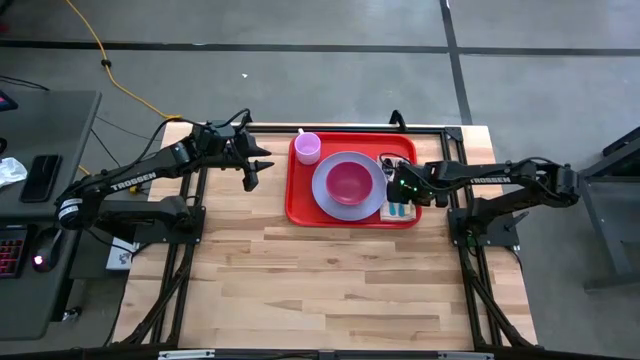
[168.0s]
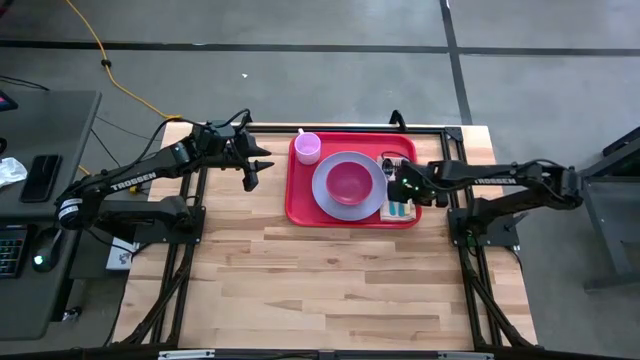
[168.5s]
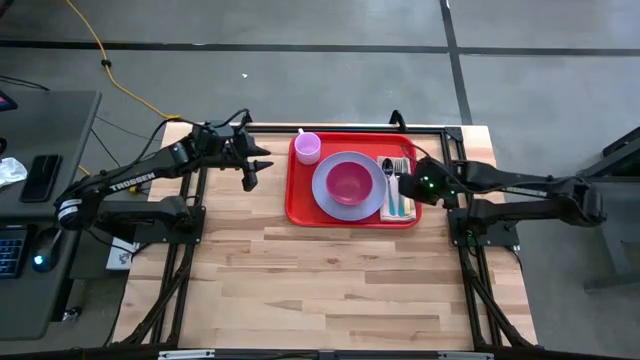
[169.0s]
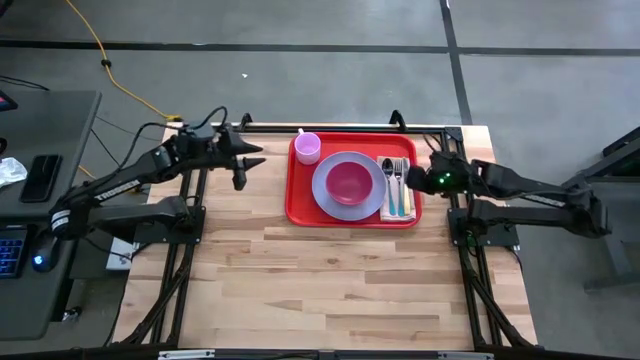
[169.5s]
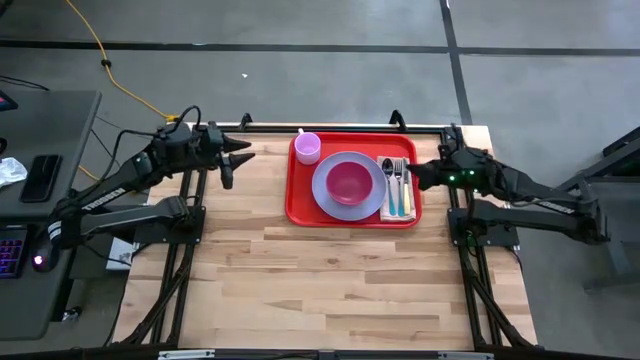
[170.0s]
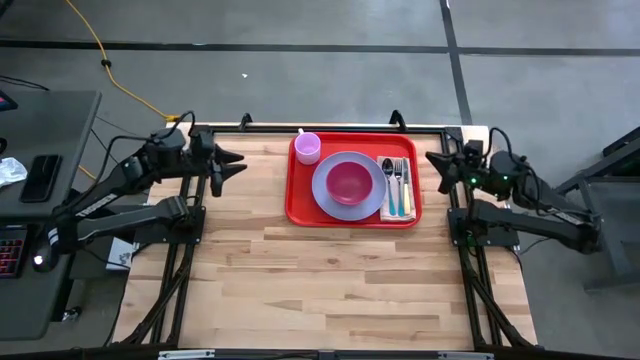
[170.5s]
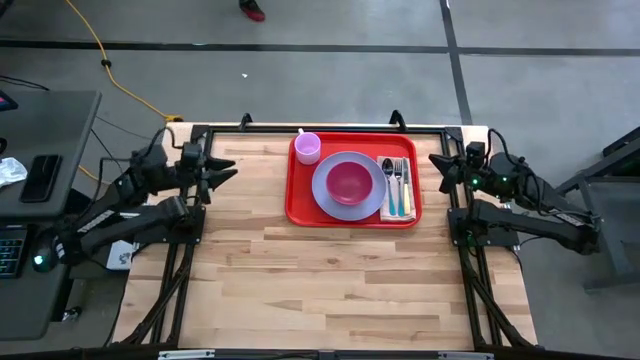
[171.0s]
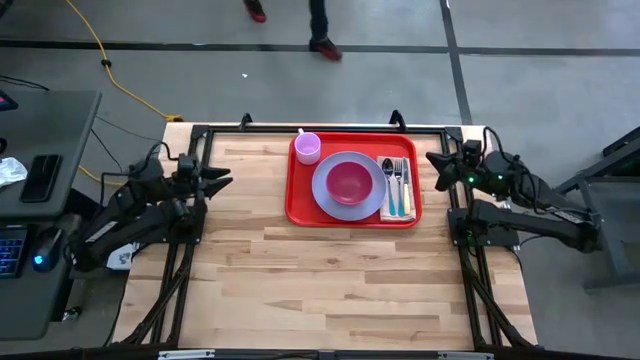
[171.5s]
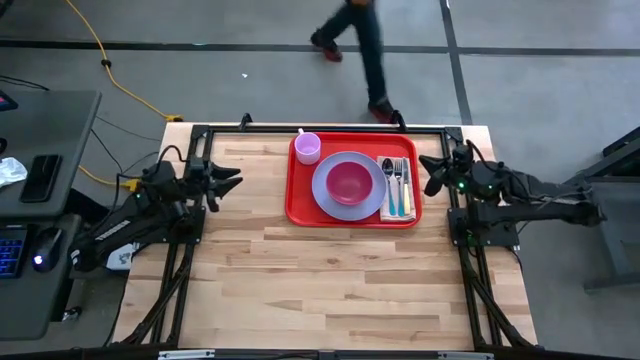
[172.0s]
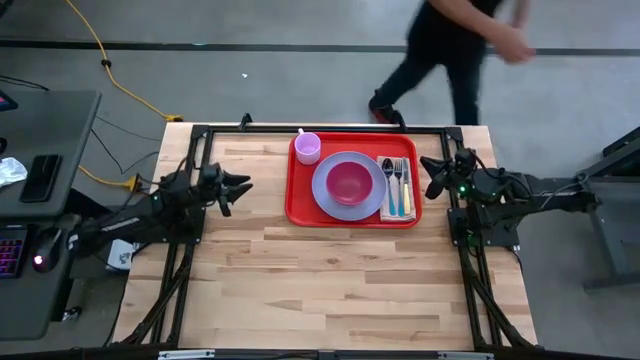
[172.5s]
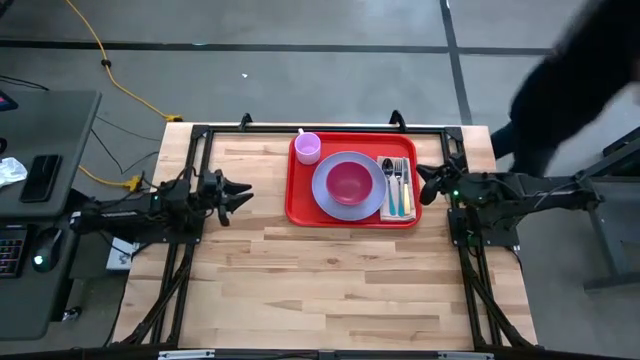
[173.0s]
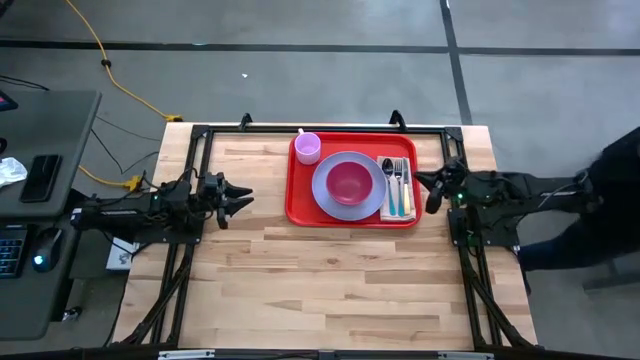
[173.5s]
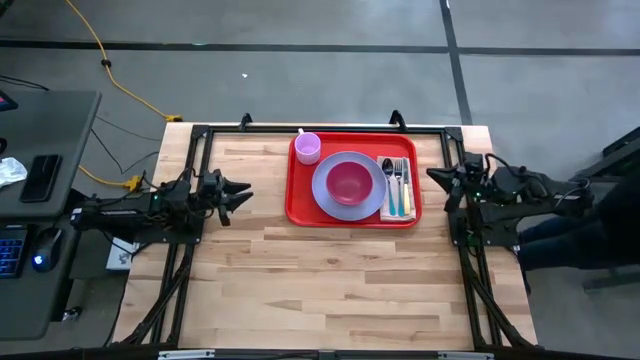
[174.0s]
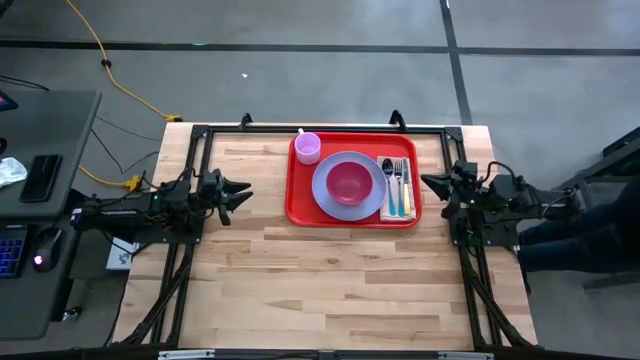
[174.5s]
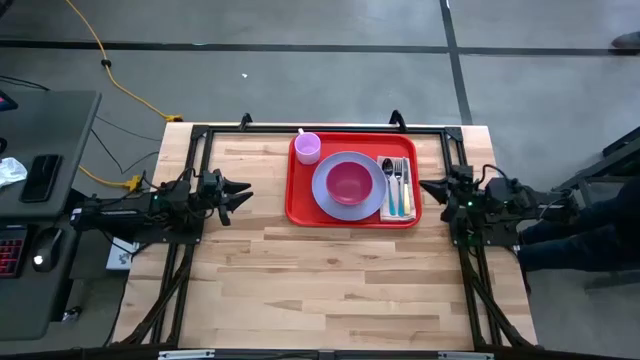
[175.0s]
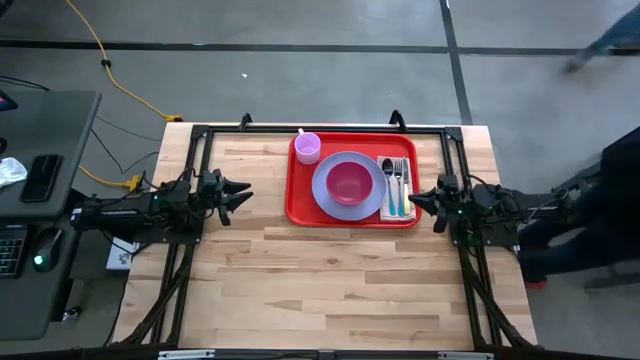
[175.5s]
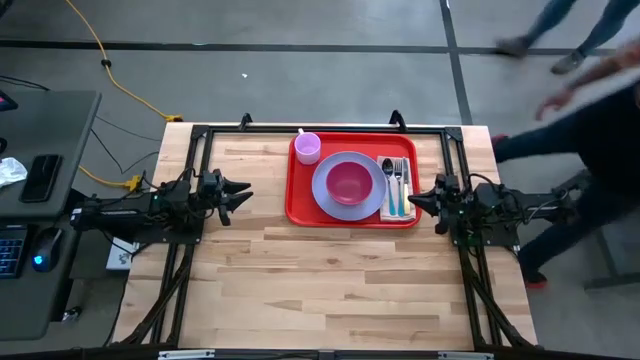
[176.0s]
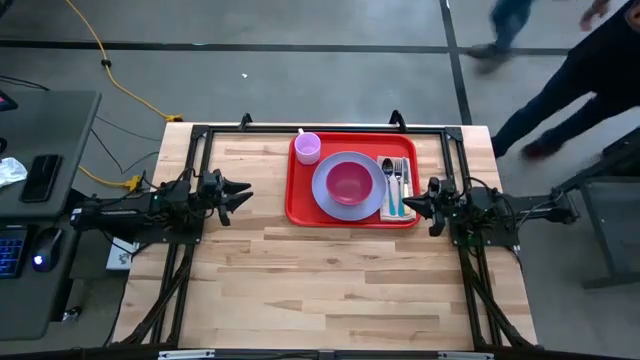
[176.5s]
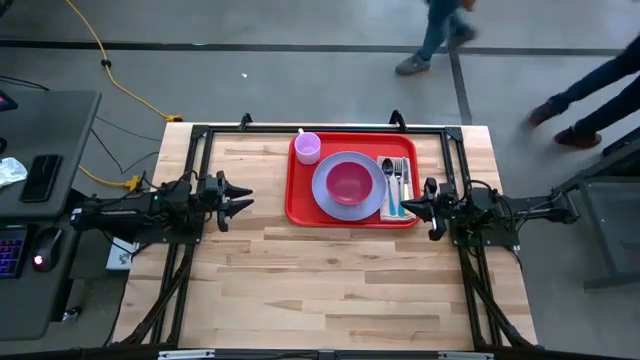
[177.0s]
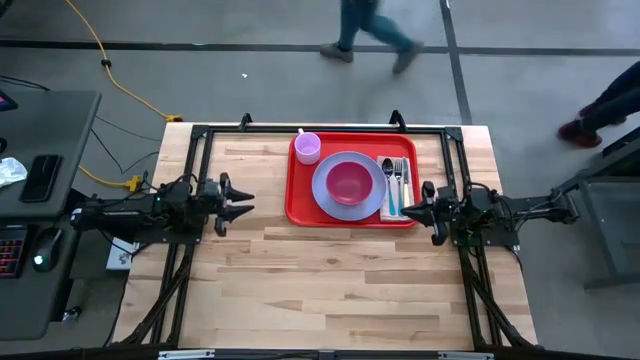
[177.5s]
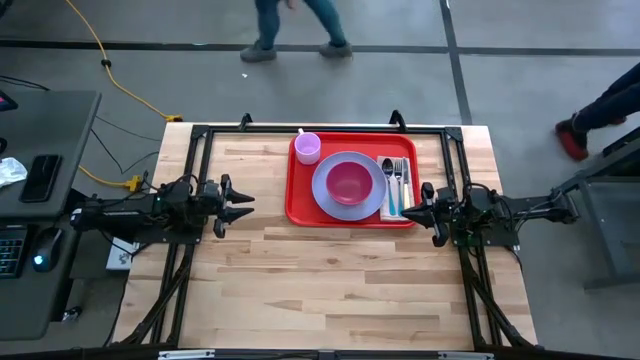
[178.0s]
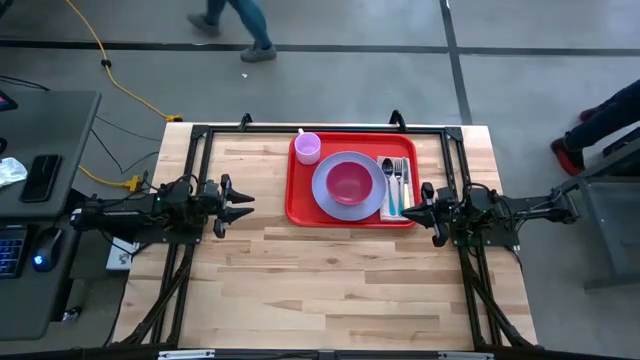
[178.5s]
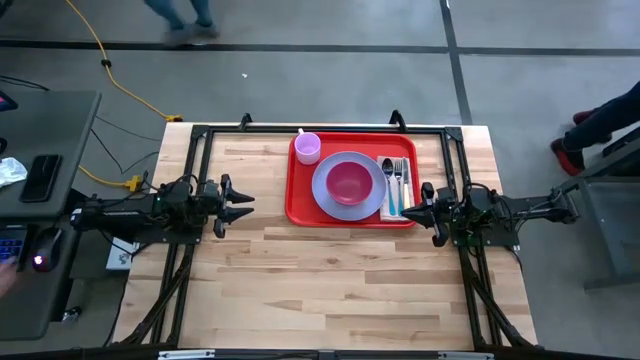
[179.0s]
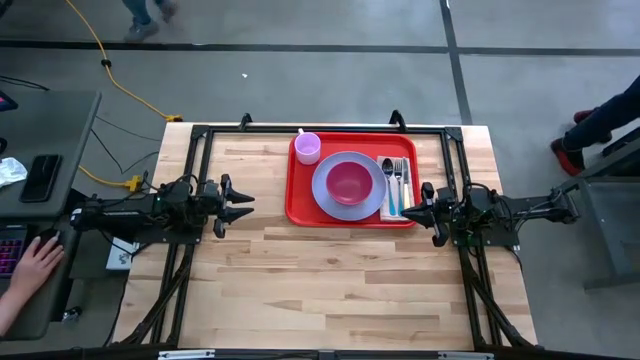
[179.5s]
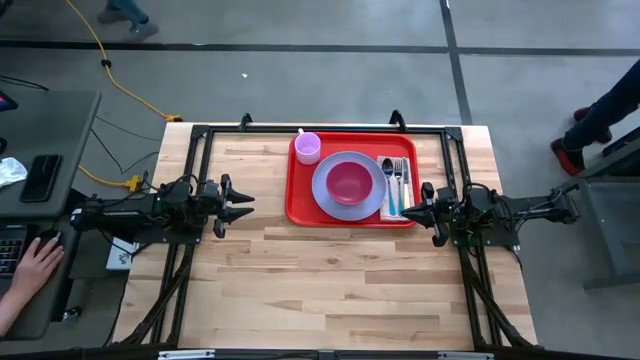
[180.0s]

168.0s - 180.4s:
Task: Set up tray
Return to Home Position

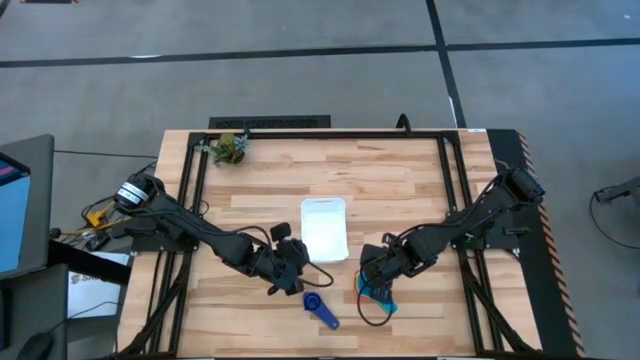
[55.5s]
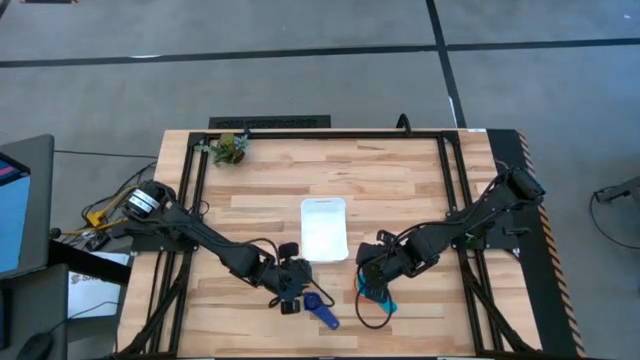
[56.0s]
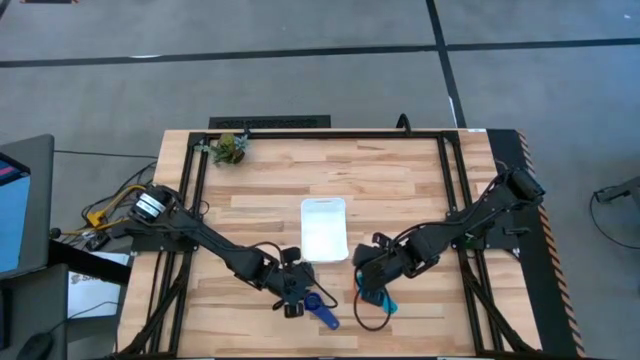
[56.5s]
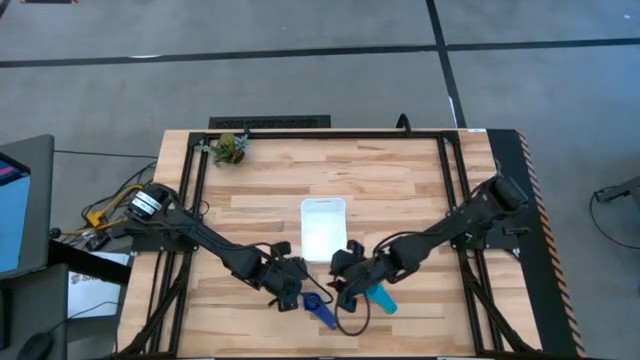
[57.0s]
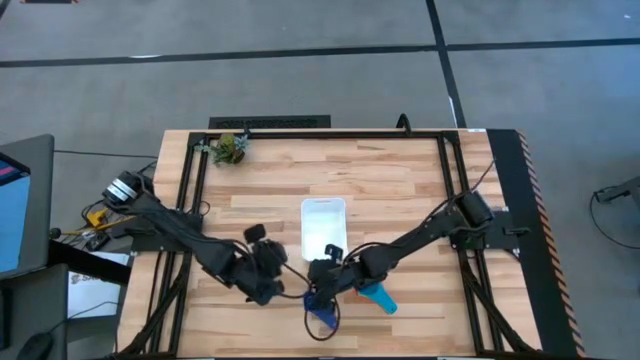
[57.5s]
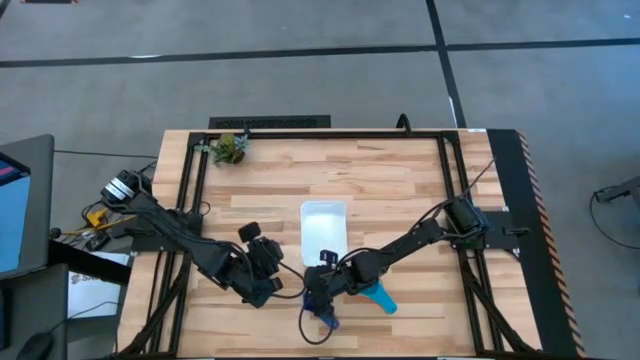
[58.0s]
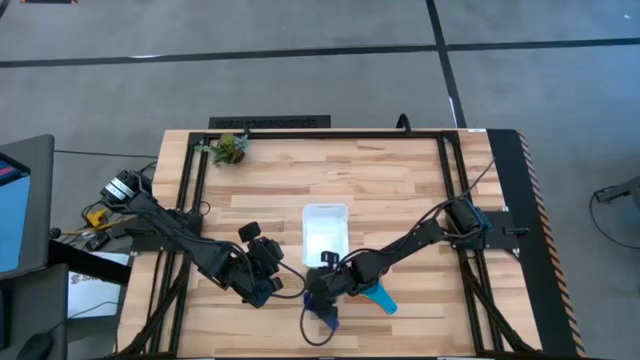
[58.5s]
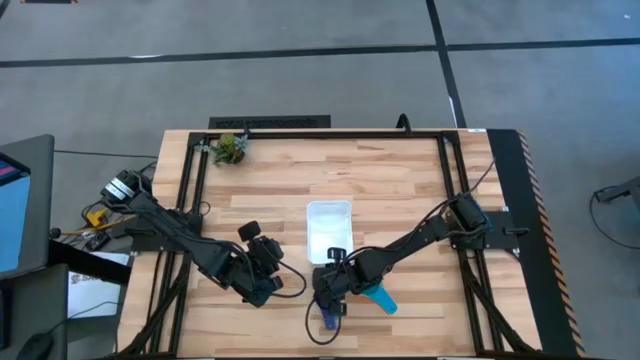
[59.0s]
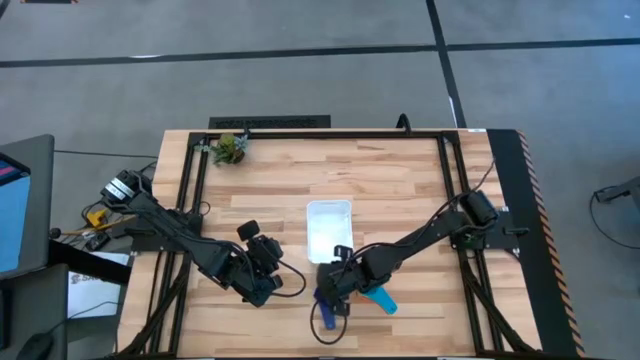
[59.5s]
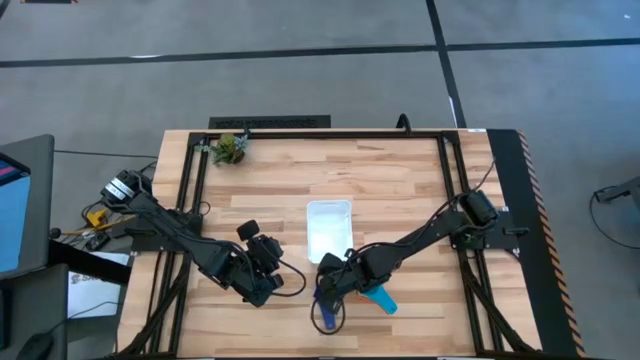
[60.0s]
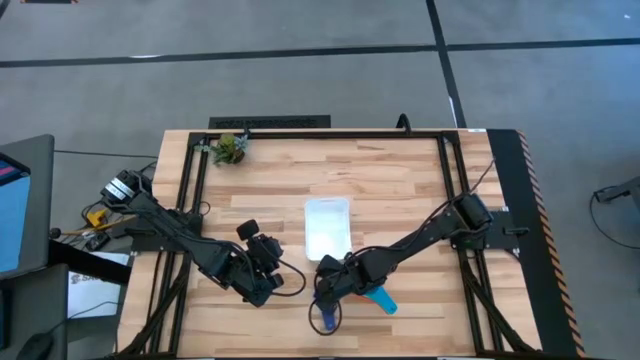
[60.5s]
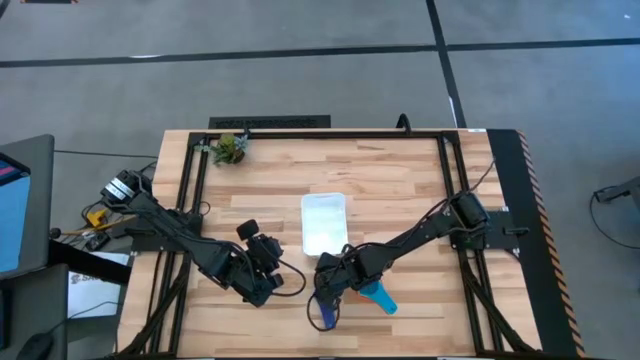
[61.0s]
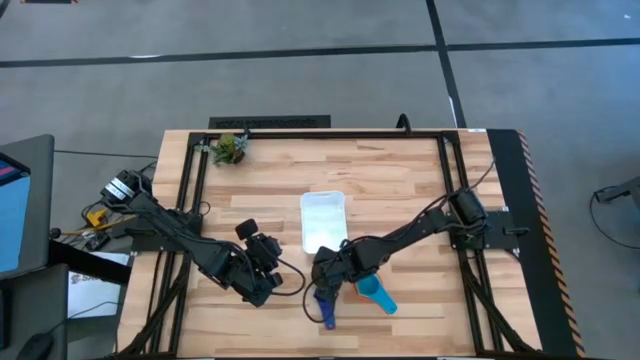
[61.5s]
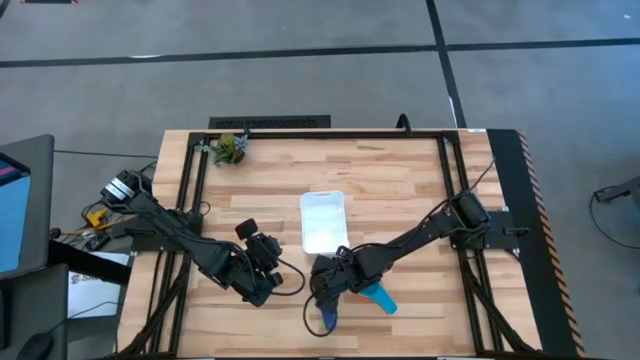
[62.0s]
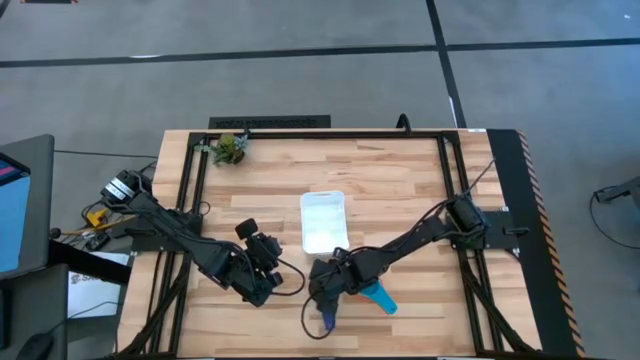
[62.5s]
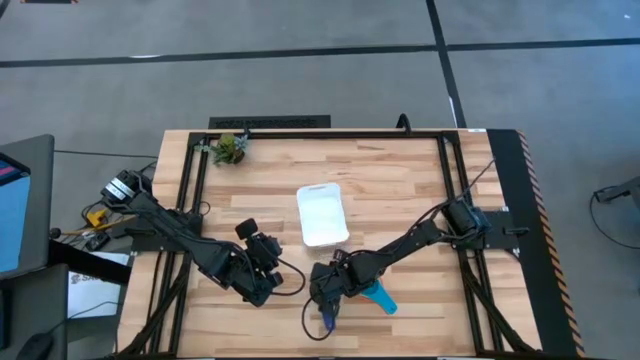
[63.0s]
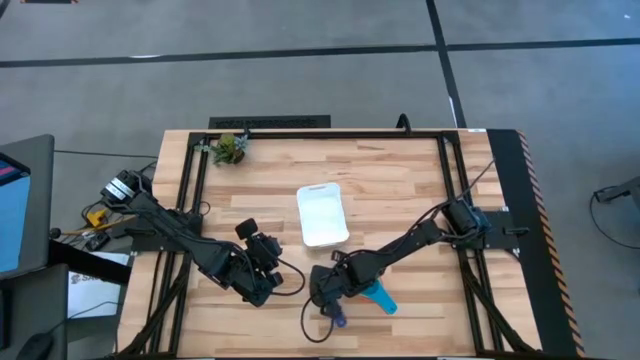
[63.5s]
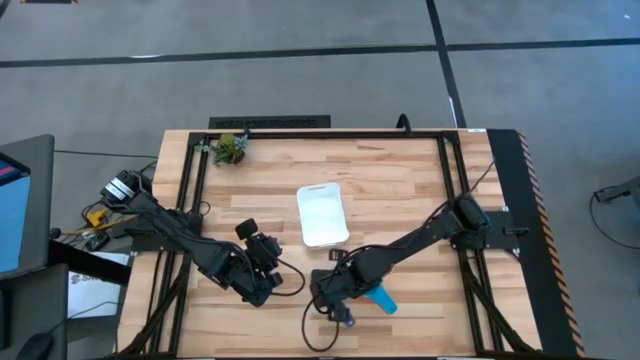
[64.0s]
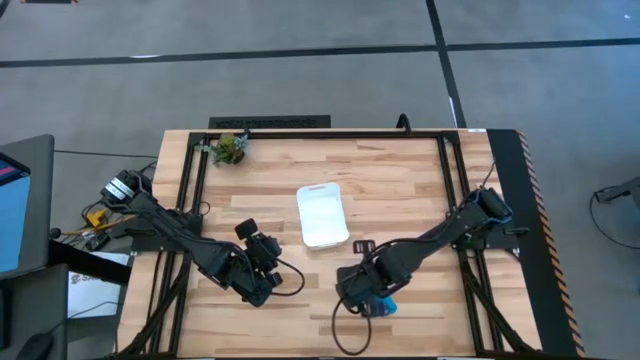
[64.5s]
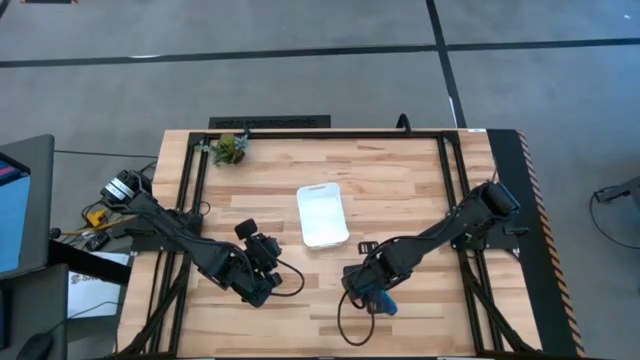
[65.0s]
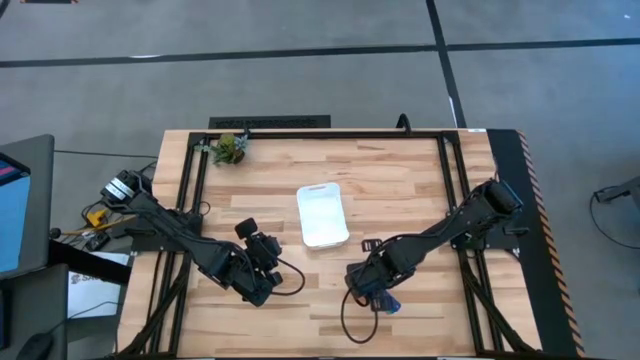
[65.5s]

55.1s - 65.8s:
Task: Nest measuring cups in basket
Stack the violet measuring cup on top of the light blue measuring cup
